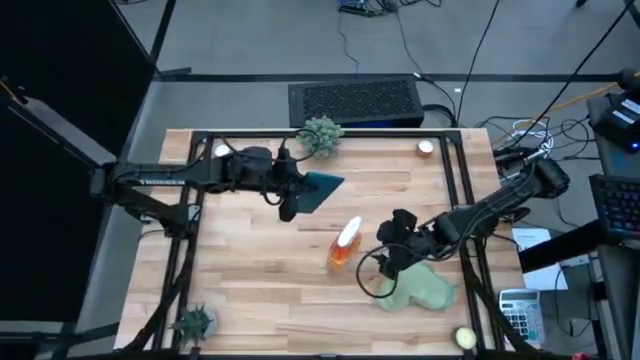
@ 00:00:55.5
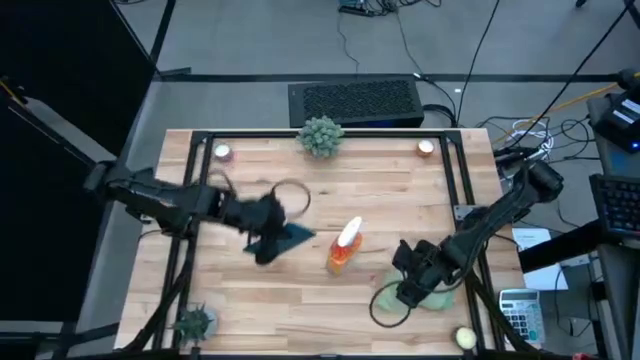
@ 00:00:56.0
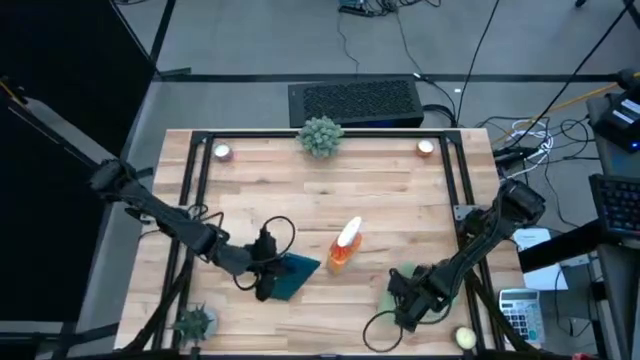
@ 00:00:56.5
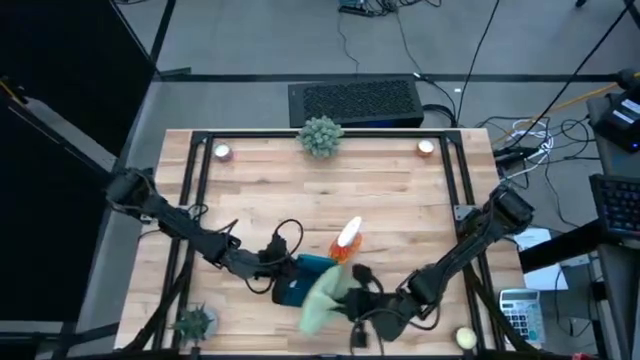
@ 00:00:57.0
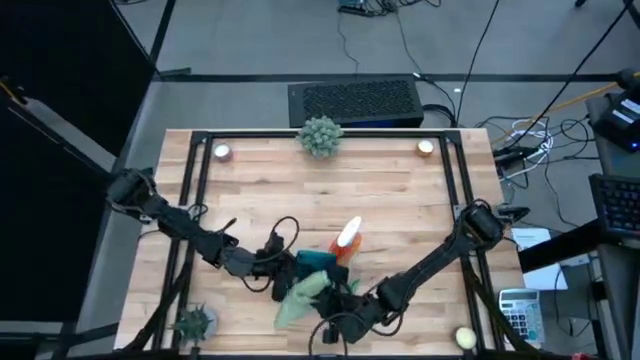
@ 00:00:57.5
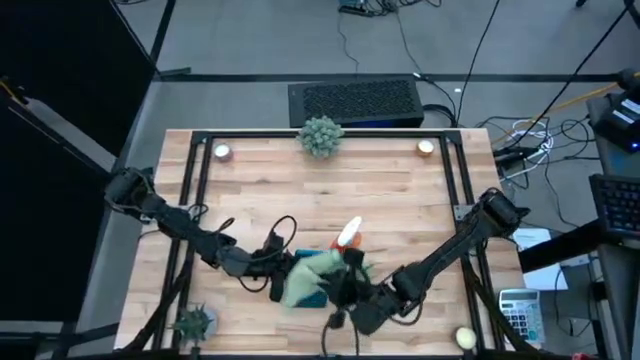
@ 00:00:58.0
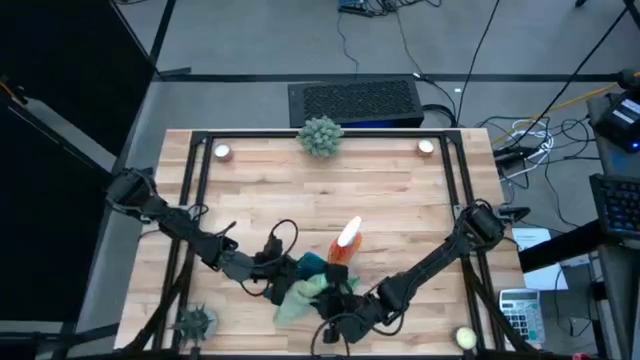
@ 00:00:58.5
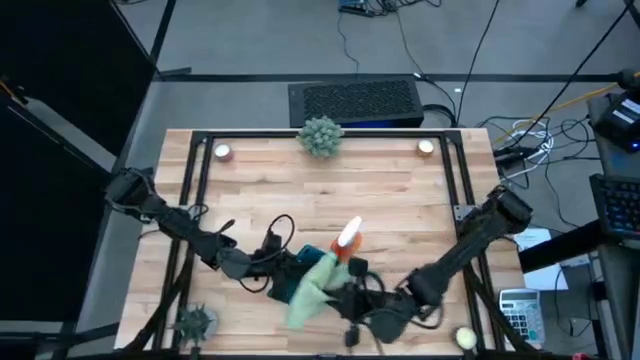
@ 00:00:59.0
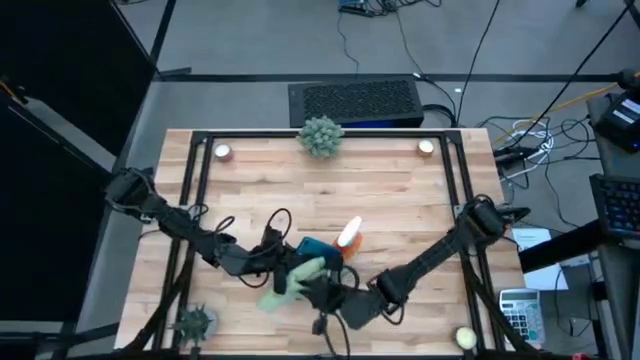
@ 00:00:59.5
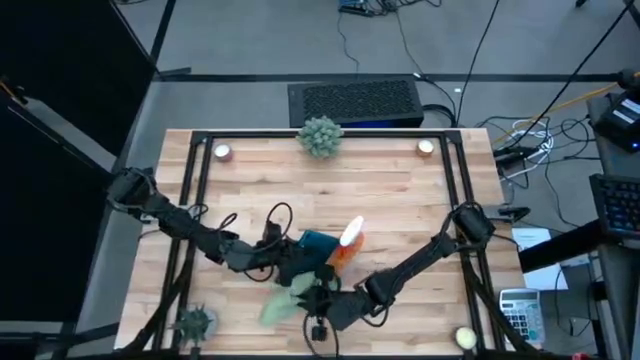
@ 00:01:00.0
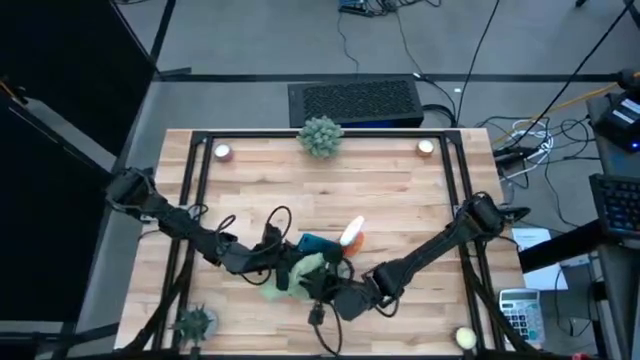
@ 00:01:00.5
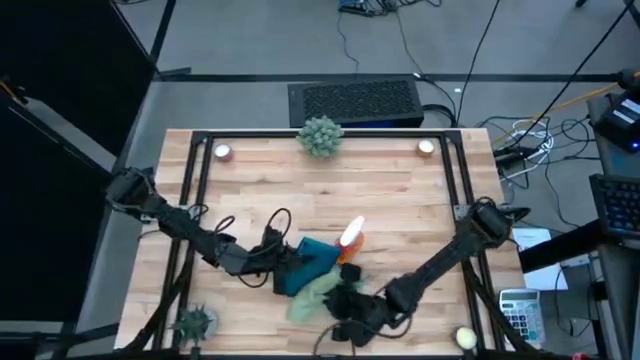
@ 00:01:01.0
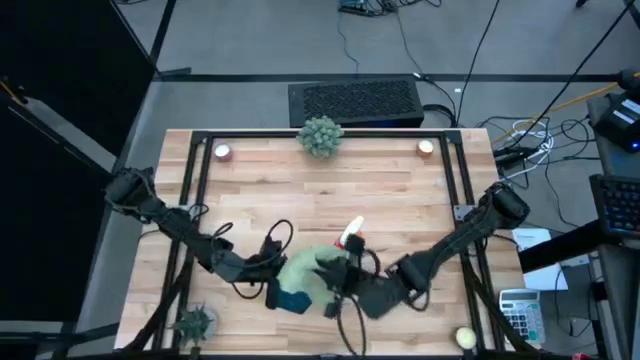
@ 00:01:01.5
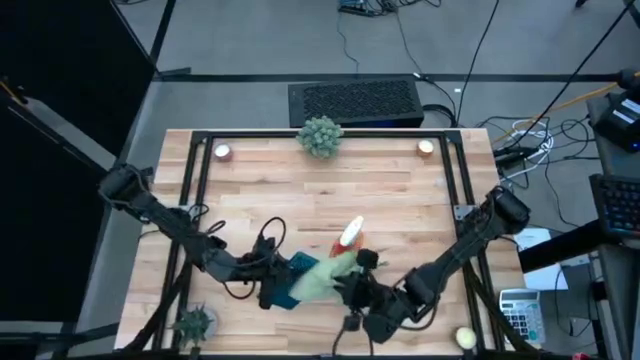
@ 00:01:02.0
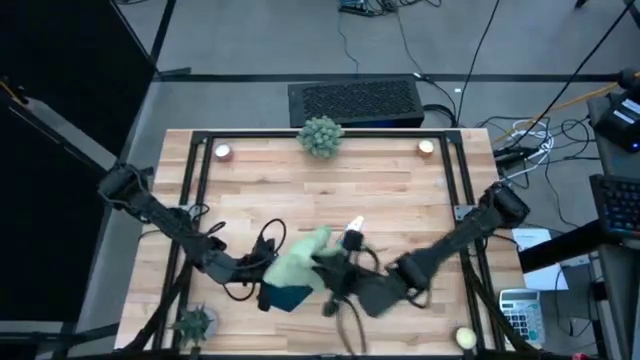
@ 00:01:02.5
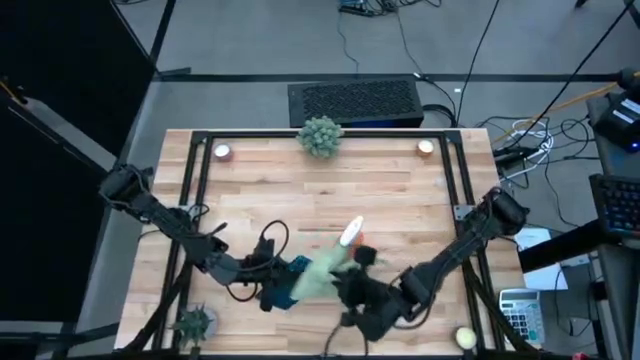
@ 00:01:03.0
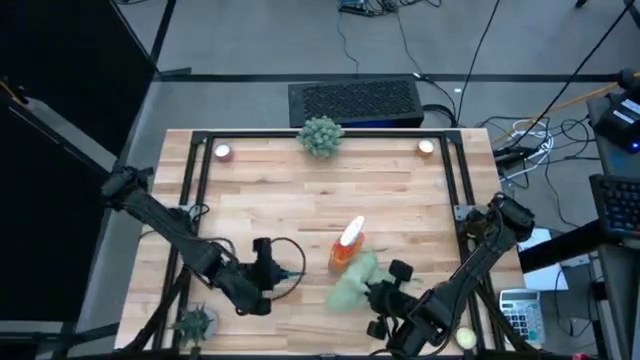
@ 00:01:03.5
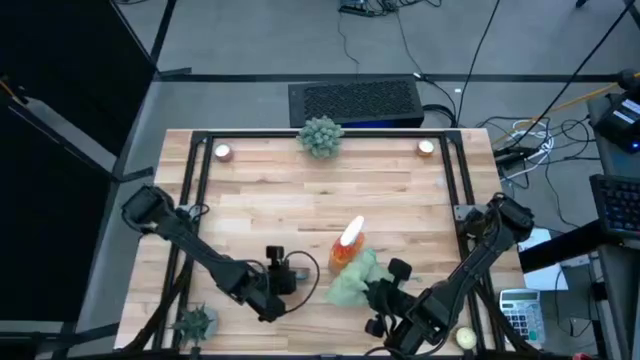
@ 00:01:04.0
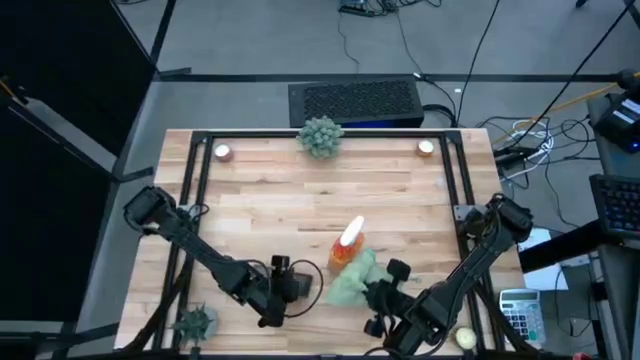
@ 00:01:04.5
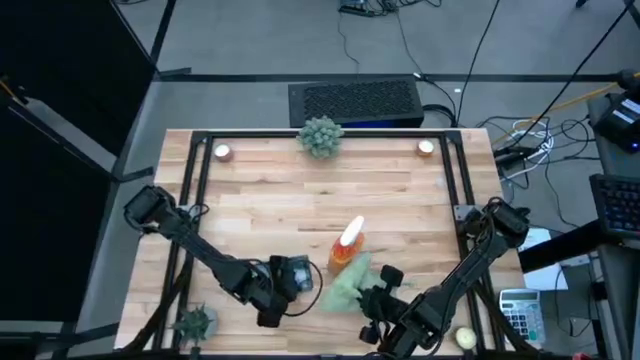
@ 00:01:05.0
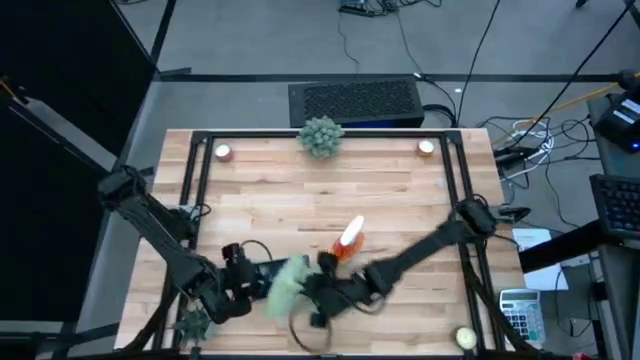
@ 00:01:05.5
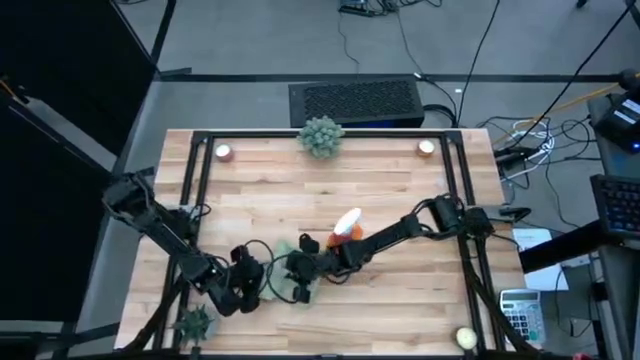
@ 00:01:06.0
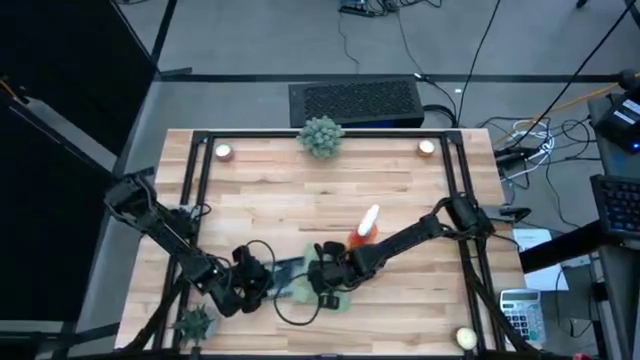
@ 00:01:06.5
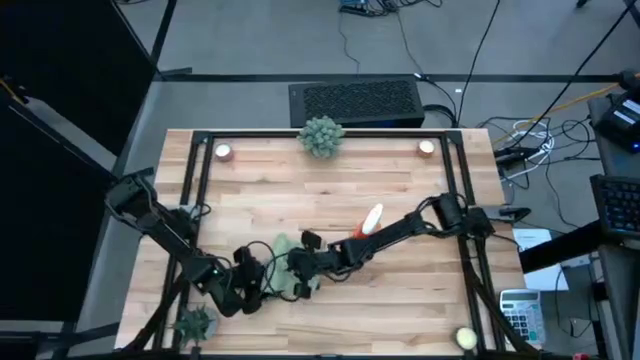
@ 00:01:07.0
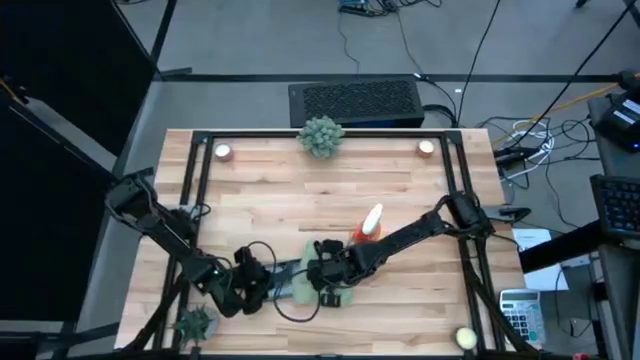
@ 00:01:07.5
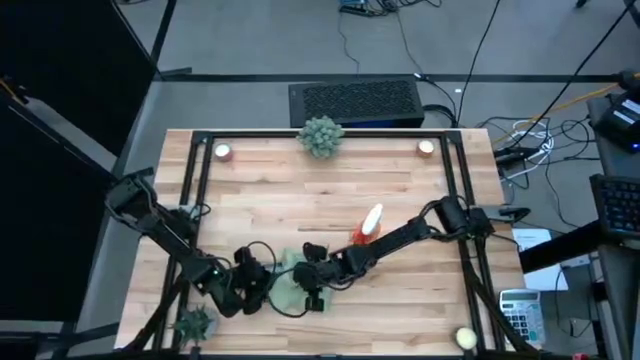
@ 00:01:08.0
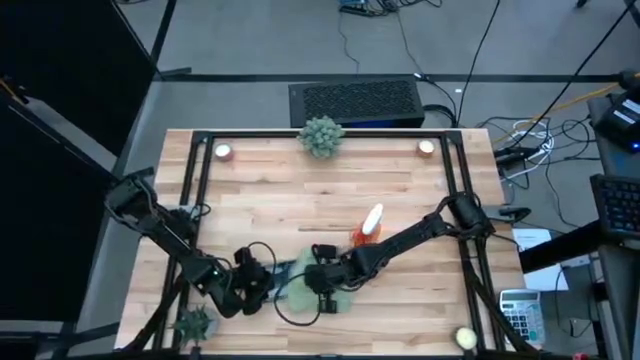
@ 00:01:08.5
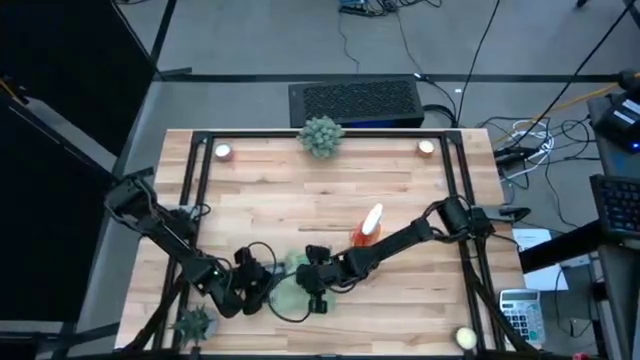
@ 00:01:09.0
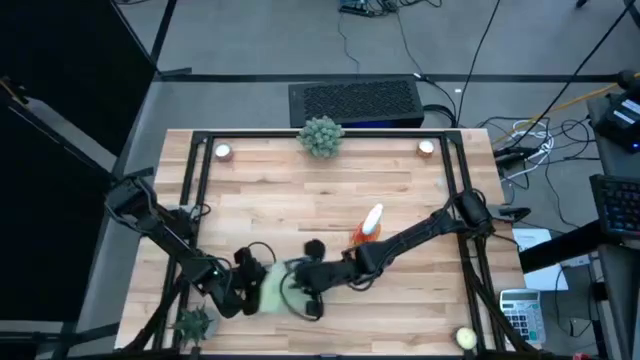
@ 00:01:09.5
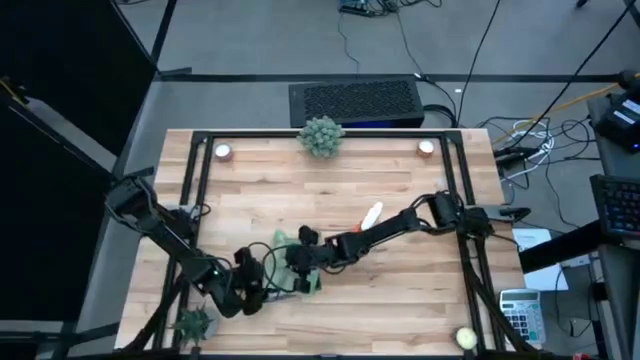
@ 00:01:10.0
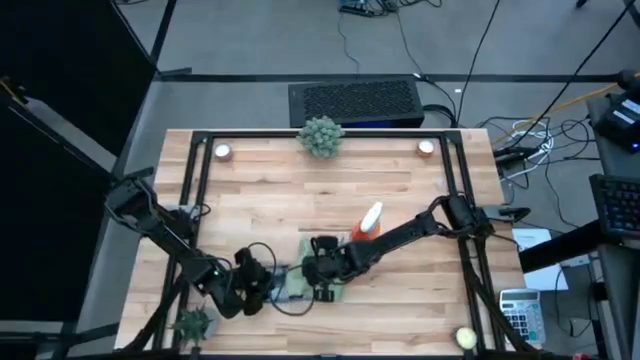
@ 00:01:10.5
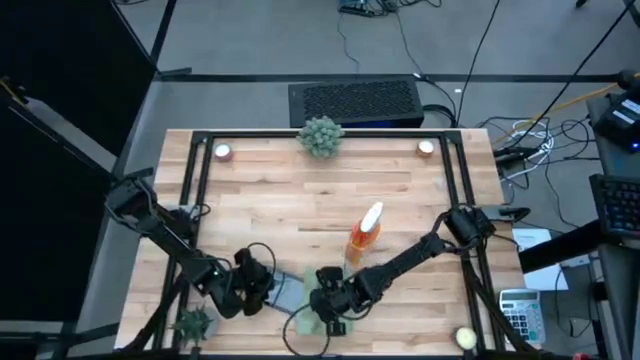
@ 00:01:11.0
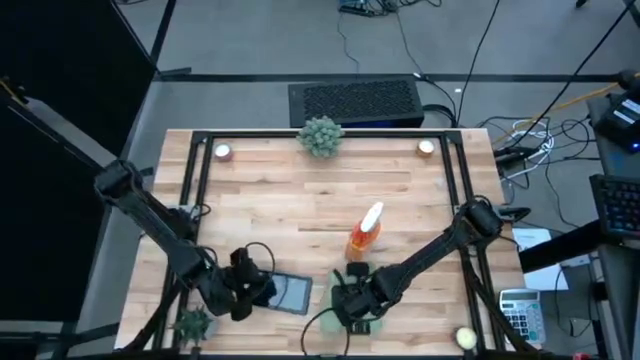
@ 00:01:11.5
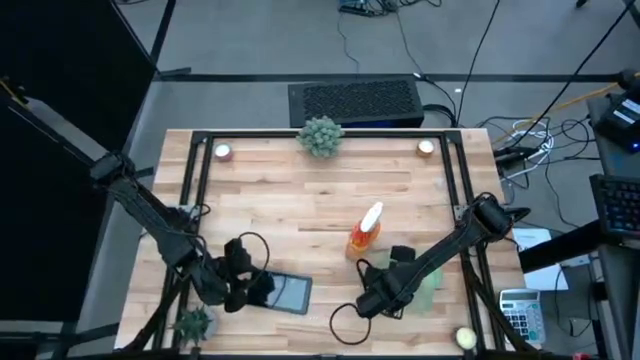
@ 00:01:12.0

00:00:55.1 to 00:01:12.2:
Task: Apply microfiber cloth
Wipe the back of the tablet using the green microfiber cloth

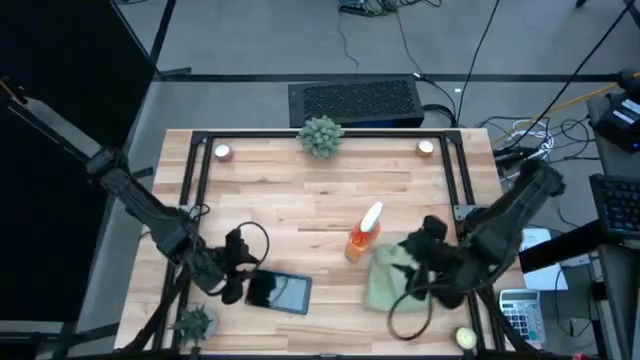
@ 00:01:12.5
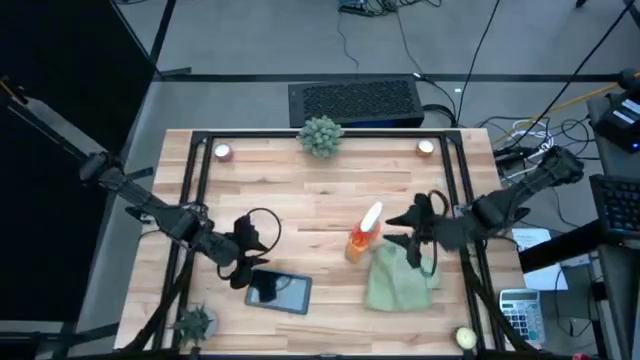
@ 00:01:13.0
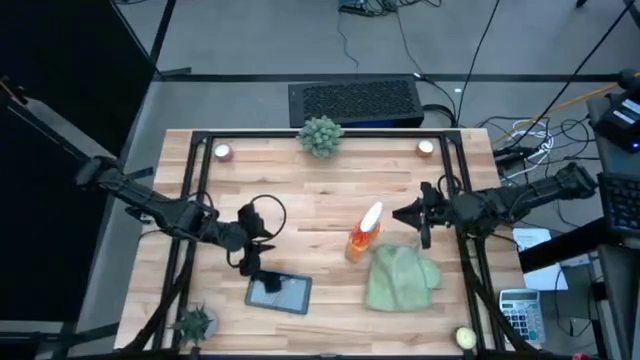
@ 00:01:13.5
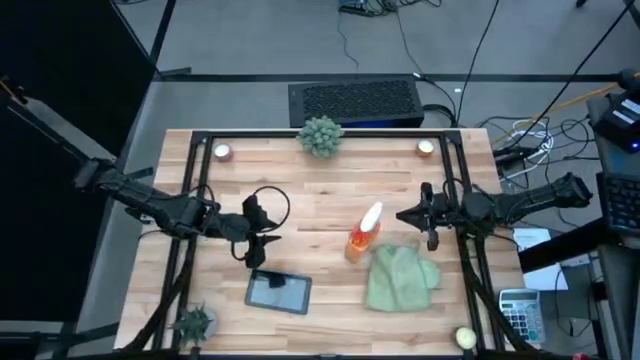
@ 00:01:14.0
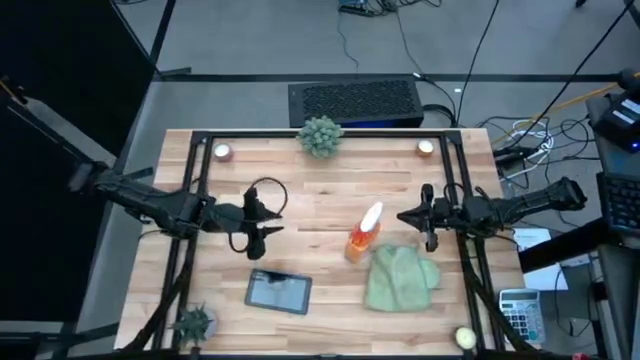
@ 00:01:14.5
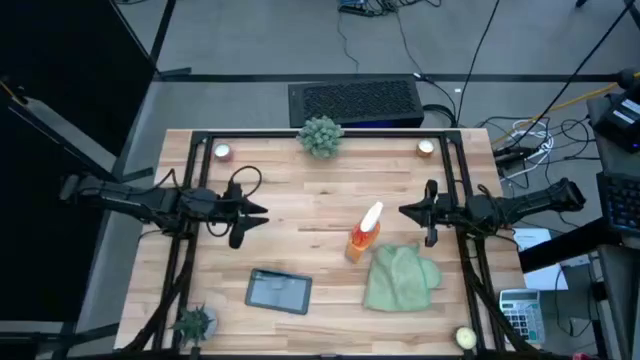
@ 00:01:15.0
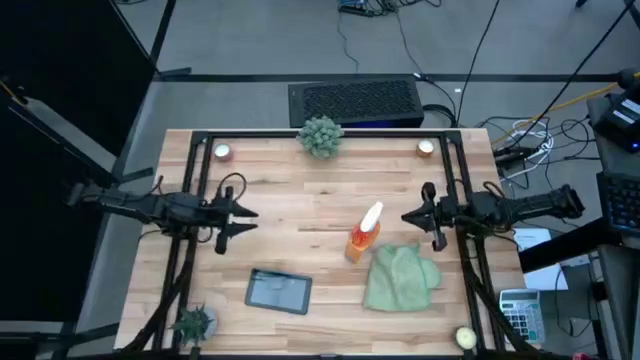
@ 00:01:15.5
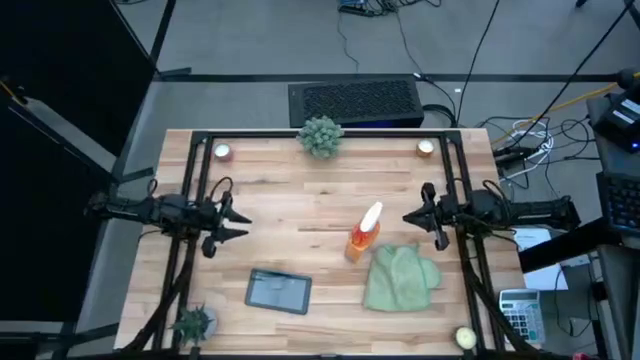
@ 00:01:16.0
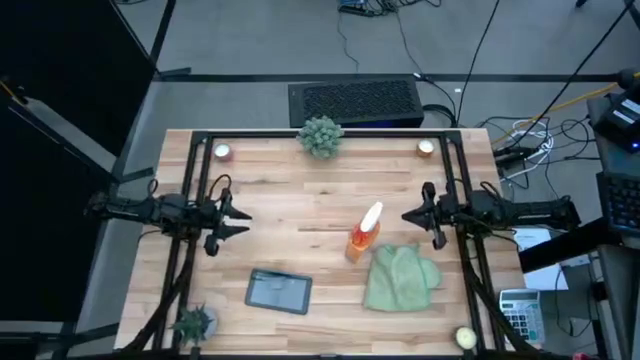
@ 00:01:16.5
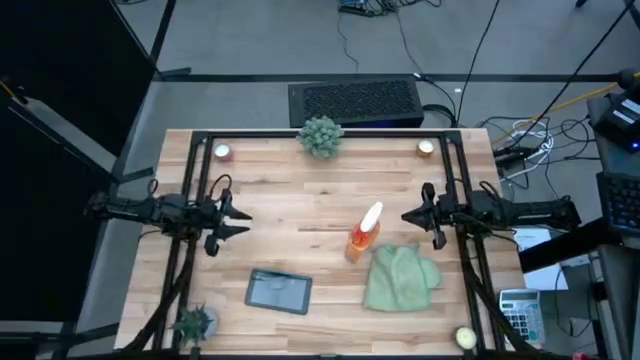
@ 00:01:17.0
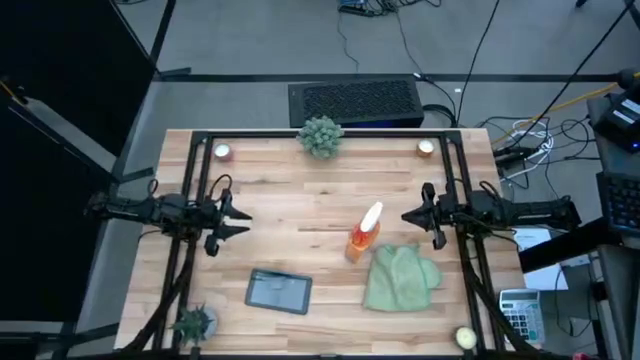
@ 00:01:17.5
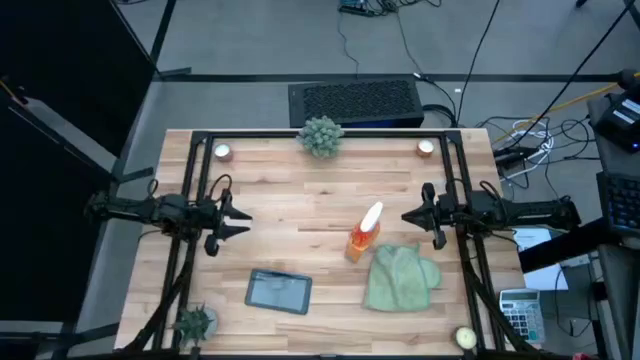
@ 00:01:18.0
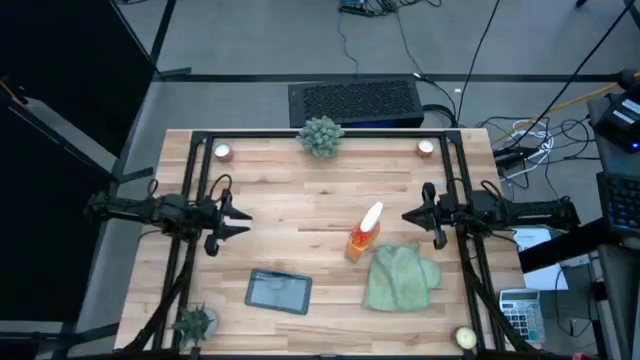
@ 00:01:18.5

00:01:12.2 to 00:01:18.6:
Return to Home Position
